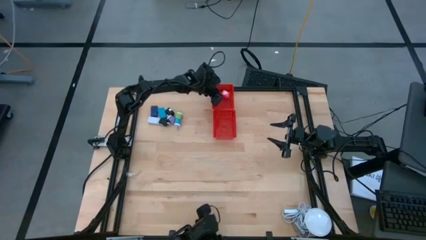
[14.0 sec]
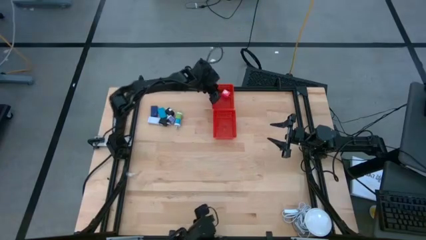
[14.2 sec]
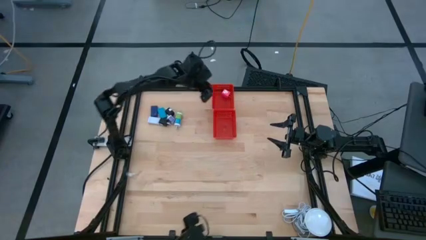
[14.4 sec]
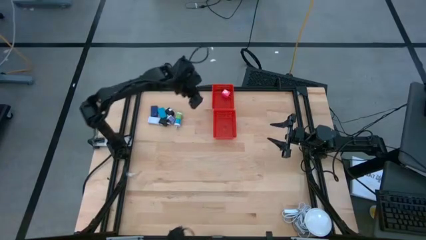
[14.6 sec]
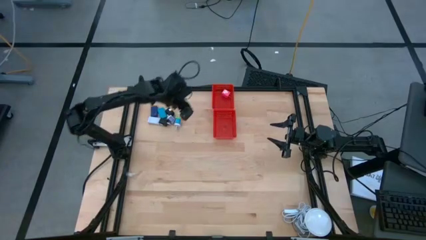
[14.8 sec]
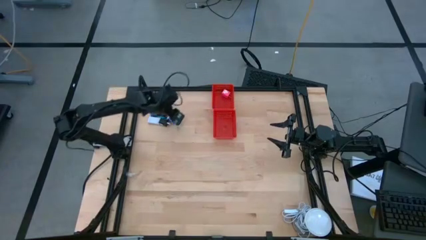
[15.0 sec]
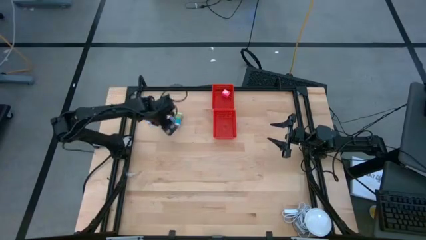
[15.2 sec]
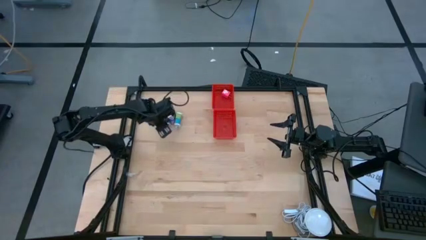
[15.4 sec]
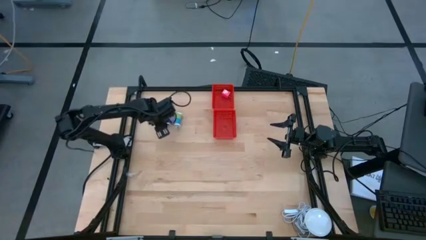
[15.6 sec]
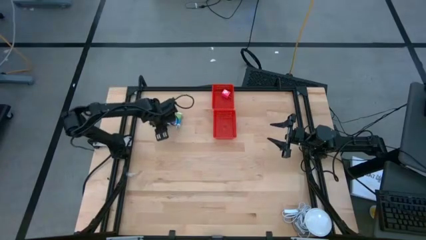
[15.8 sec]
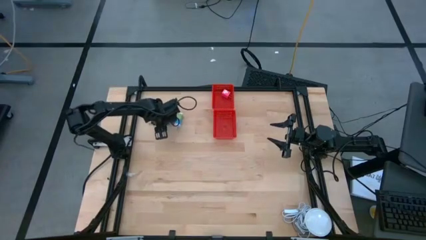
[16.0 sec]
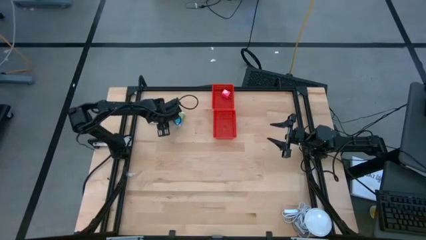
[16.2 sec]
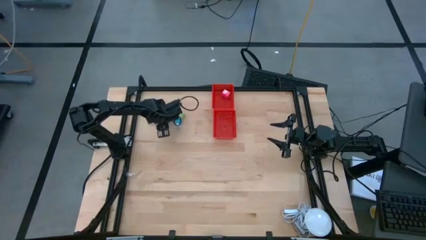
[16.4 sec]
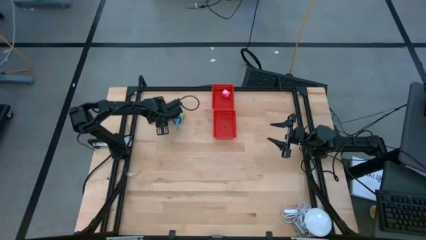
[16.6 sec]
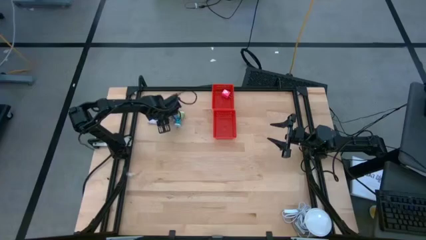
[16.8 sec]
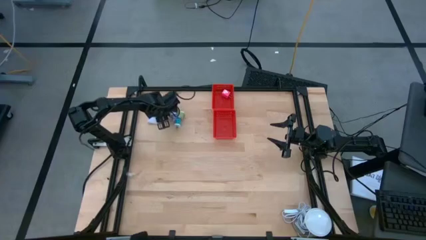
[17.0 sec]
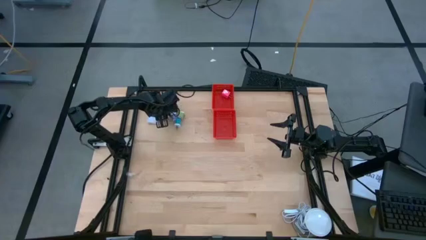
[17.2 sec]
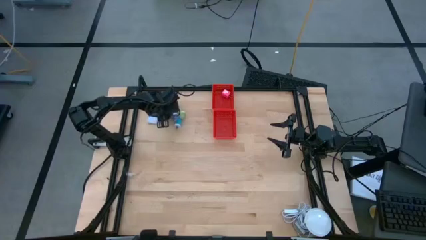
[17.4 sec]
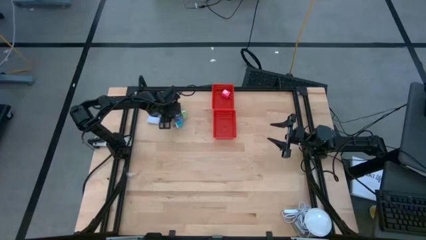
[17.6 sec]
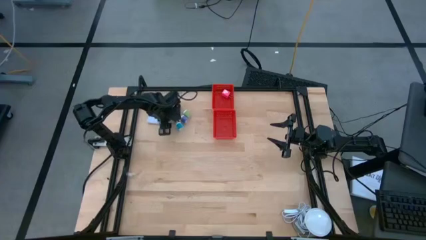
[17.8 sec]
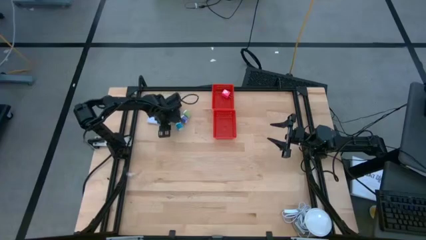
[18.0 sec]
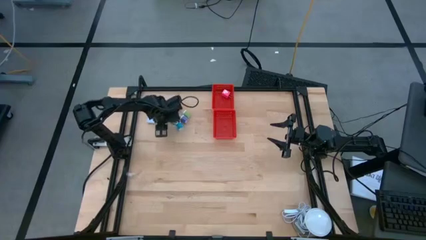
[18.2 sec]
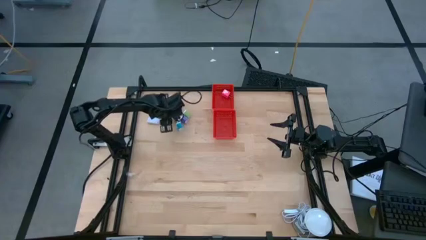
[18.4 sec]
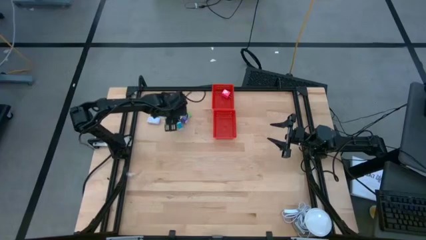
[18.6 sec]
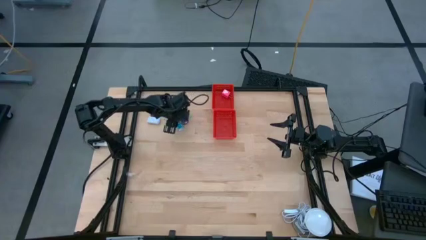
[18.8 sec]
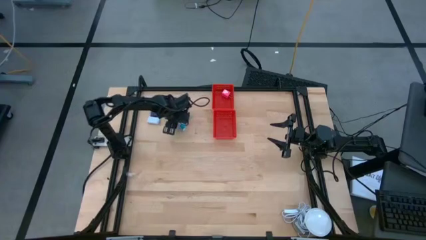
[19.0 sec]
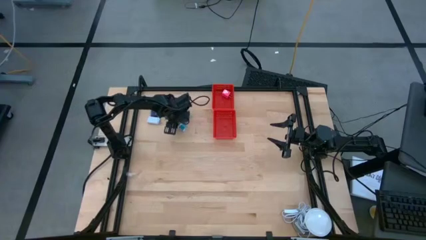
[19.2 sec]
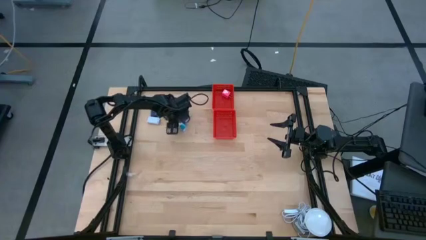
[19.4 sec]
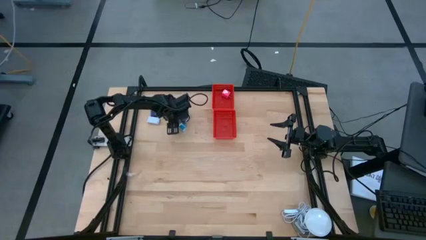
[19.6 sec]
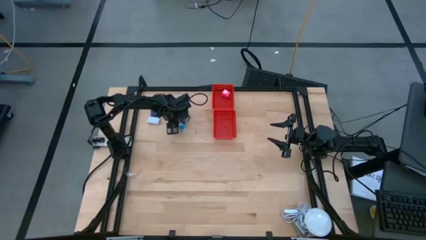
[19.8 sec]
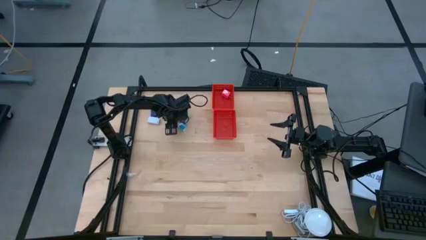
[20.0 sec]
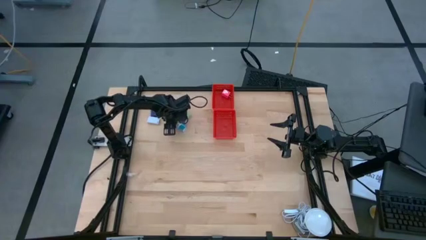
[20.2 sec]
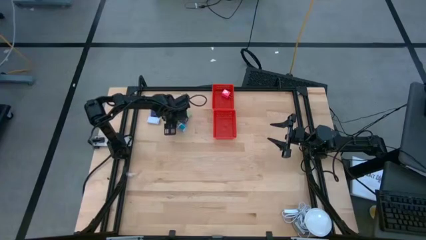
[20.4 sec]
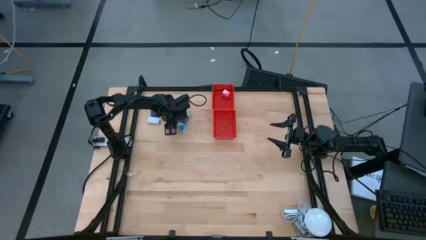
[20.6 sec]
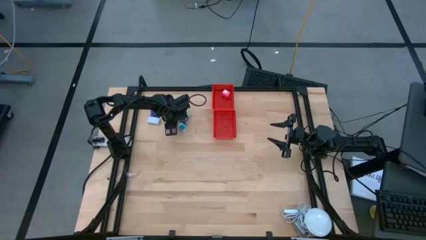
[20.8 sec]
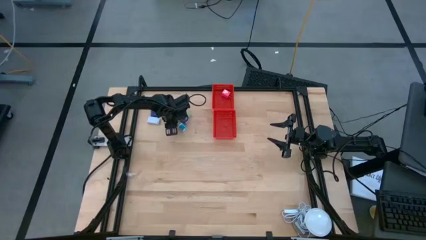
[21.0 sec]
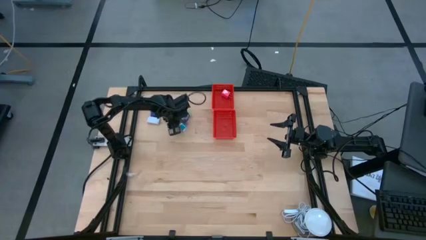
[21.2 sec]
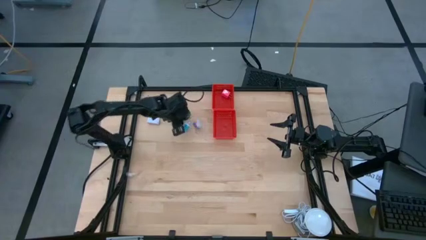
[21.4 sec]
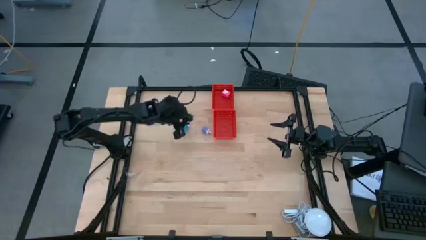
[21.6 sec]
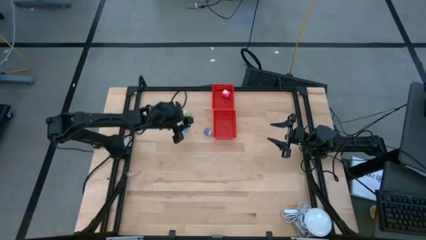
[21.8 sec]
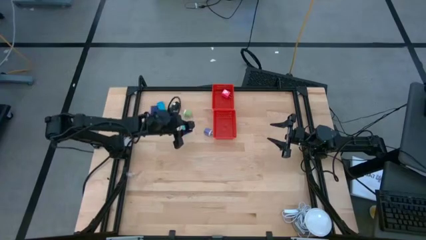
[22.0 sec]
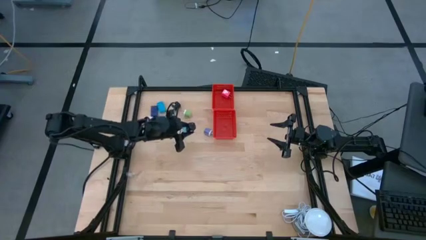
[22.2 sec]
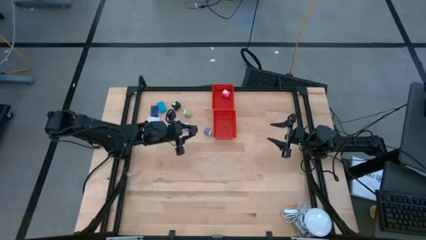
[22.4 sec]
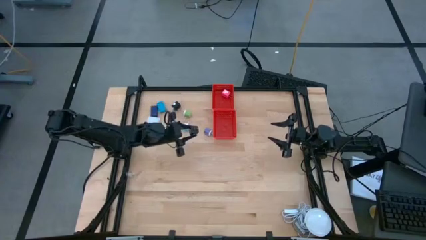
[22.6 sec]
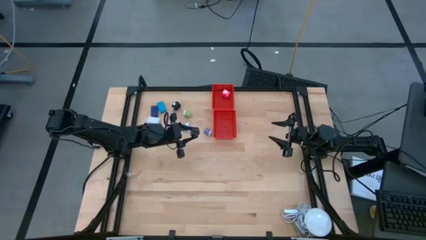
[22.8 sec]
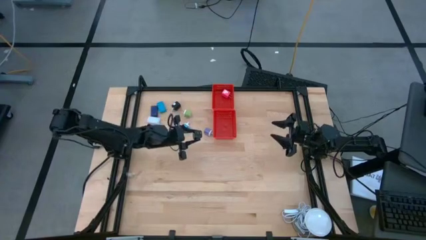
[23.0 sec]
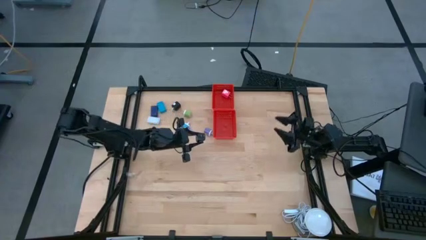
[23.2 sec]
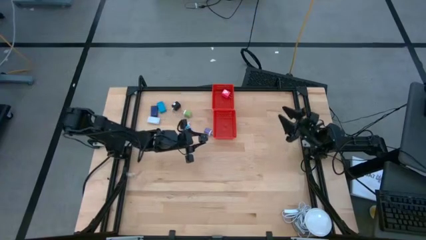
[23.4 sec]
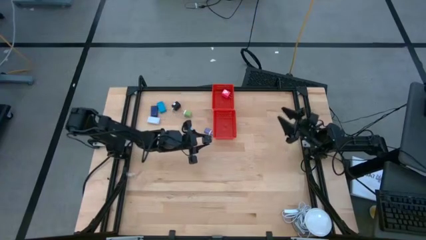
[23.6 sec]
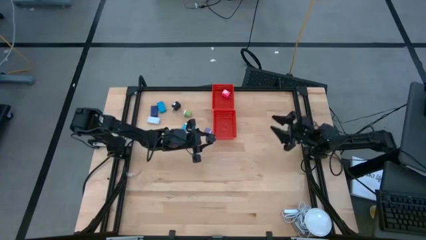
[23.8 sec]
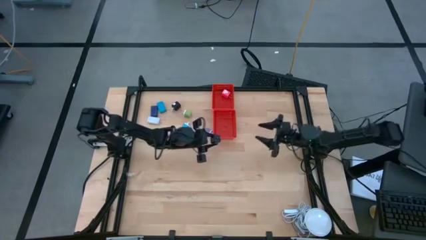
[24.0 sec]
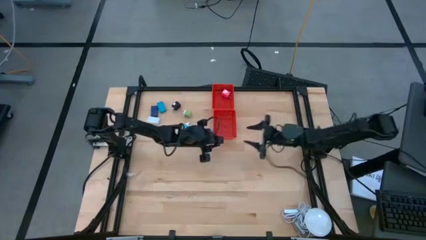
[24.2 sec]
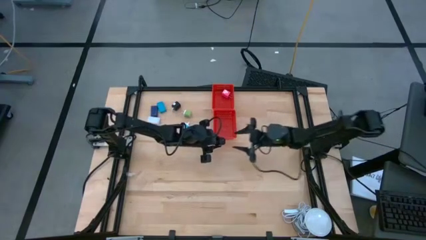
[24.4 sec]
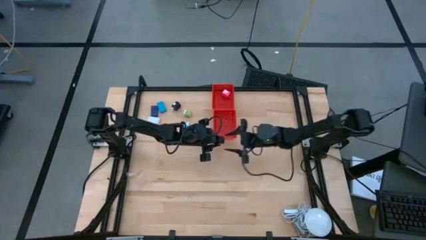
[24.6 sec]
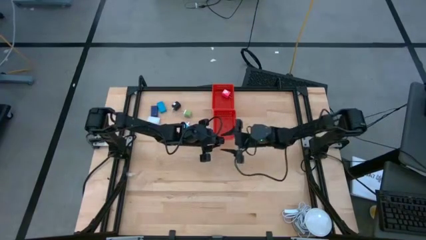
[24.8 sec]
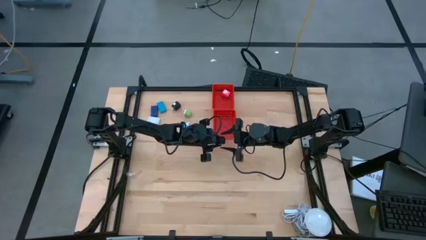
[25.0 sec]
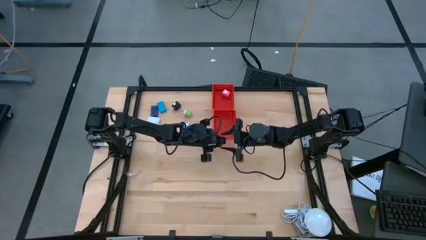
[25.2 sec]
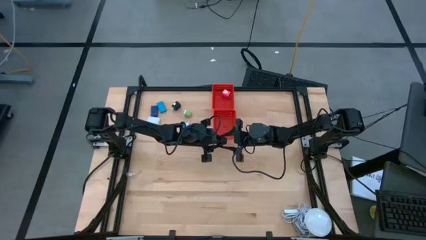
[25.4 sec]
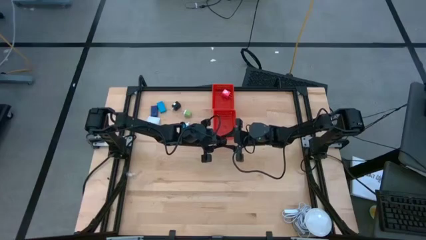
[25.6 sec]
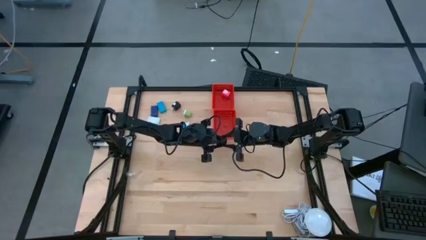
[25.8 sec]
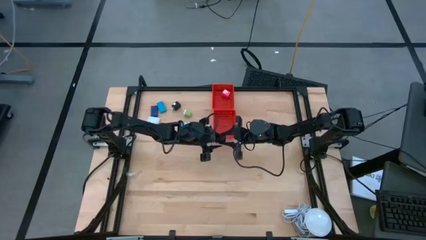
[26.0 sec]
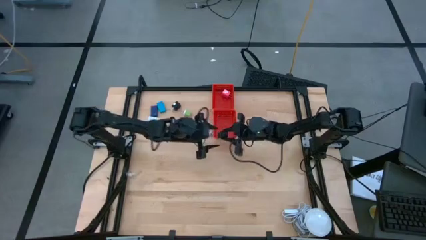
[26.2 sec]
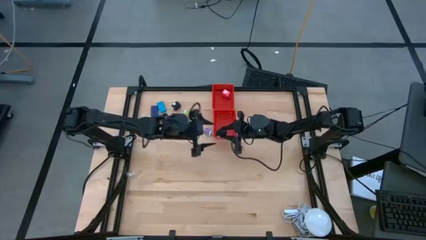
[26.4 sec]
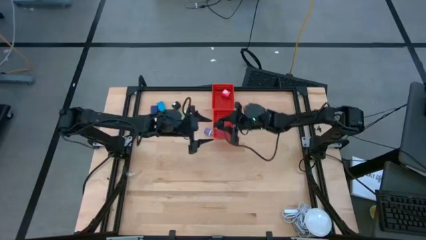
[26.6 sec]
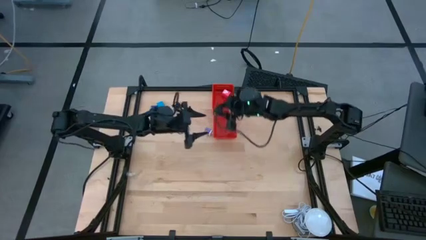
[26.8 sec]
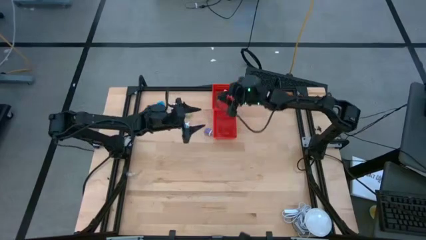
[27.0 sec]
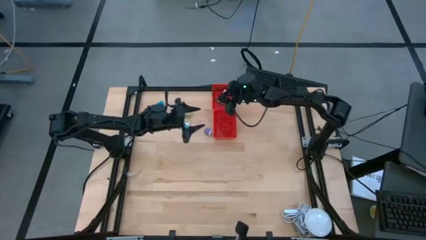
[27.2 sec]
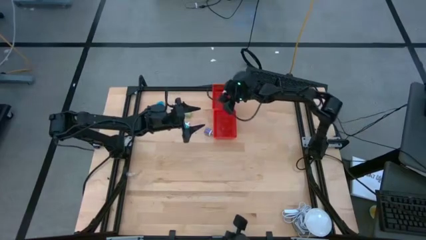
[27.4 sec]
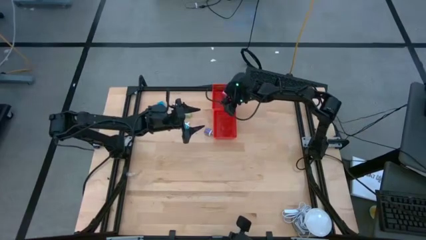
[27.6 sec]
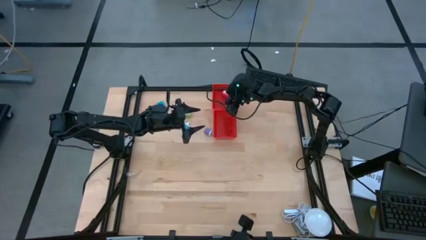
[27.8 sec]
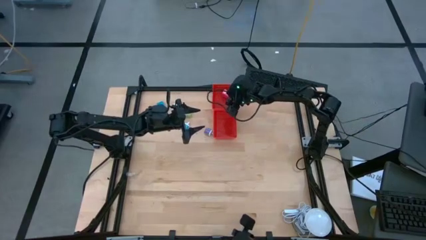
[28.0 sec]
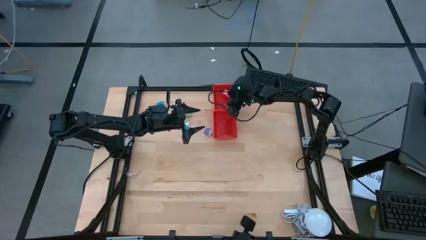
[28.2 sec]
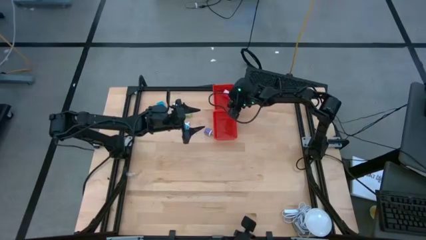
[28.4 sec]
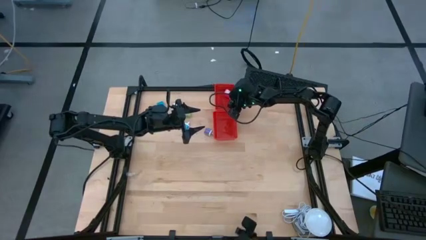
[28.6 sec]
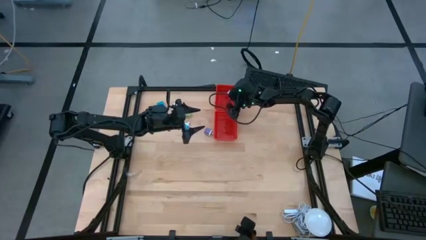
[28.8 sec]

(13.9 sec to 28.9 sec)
Task: Pick & Place Office items
Put the bottom black charger adapter into the top red basket
